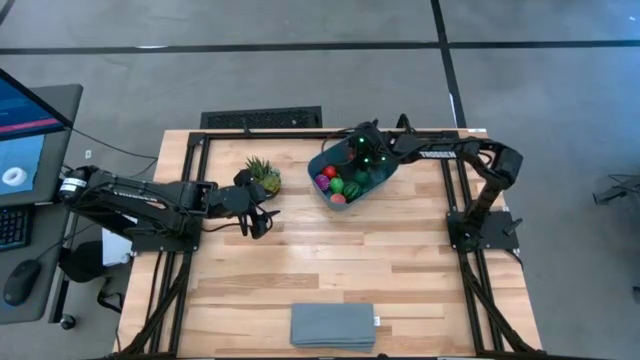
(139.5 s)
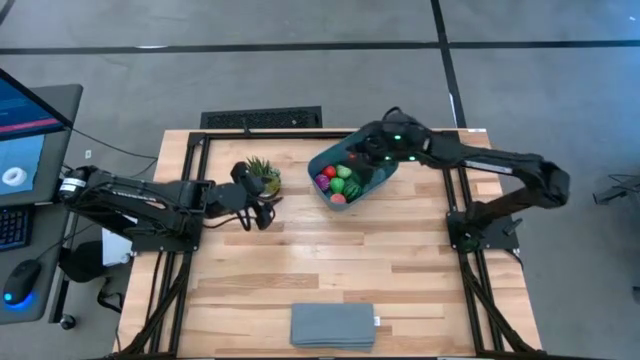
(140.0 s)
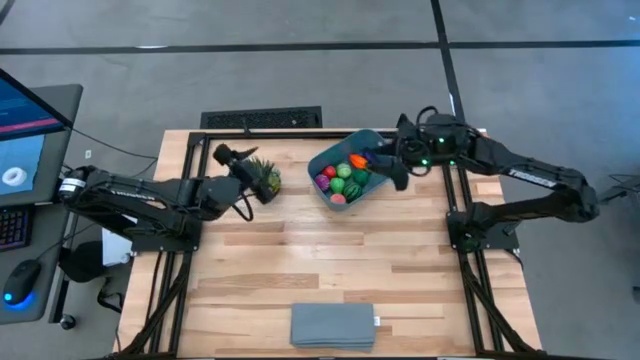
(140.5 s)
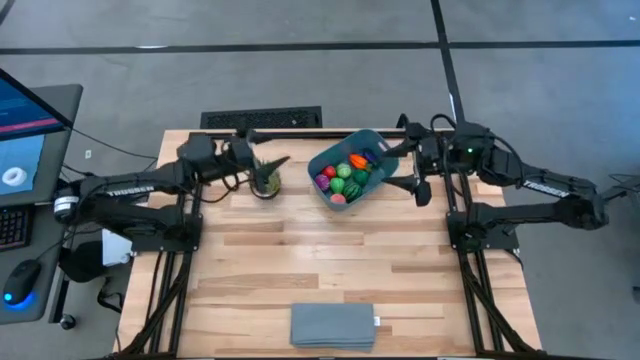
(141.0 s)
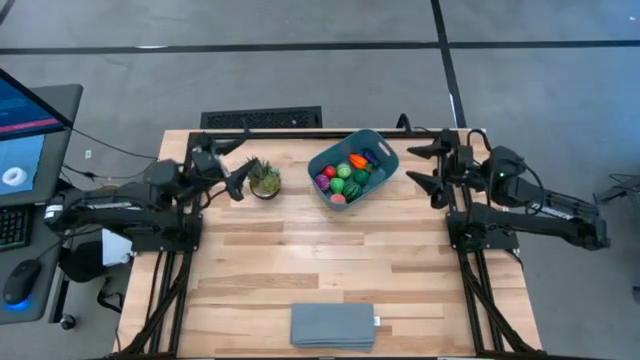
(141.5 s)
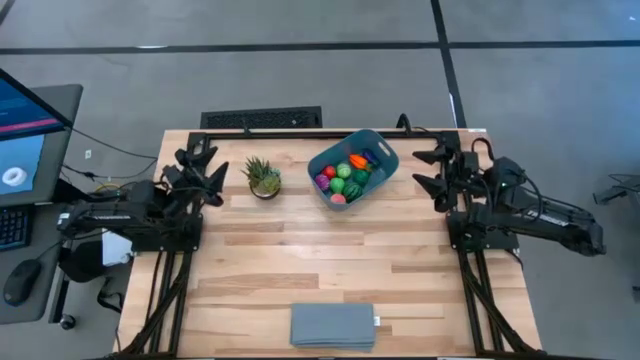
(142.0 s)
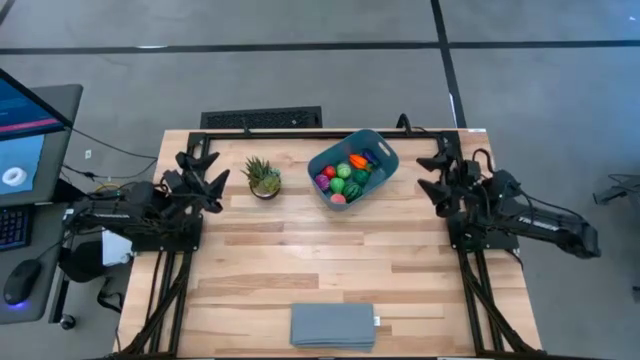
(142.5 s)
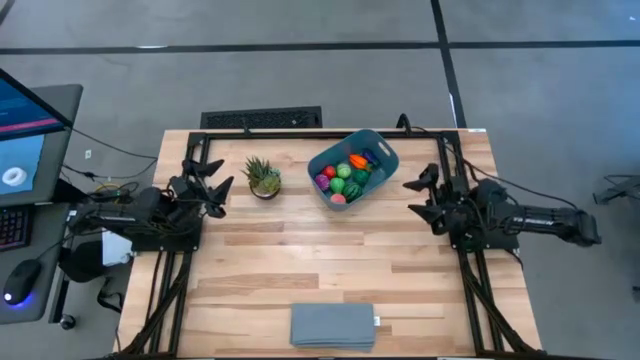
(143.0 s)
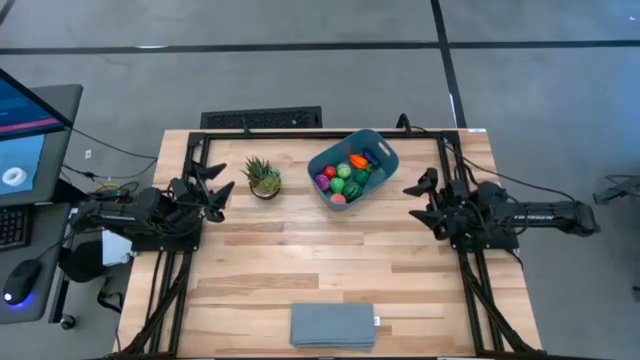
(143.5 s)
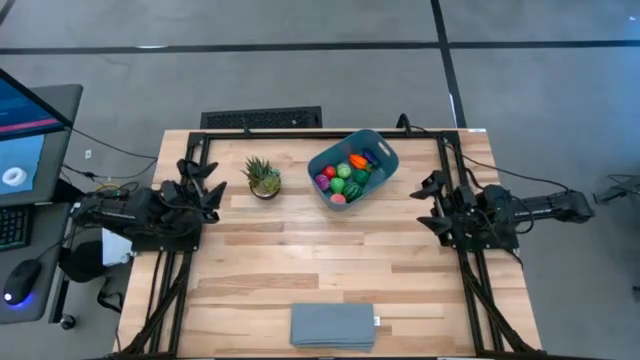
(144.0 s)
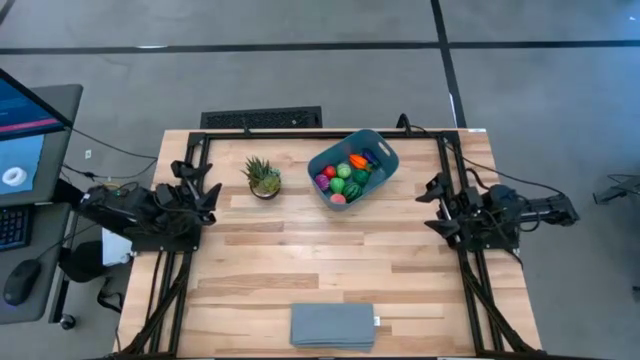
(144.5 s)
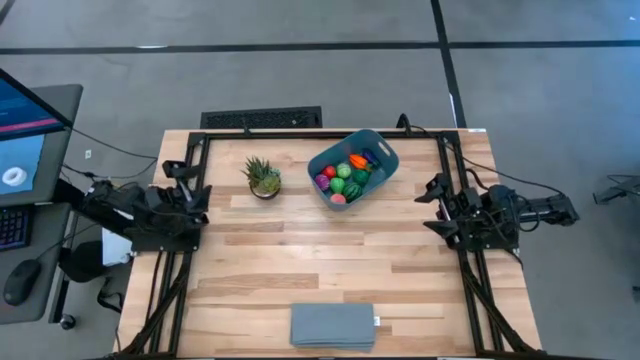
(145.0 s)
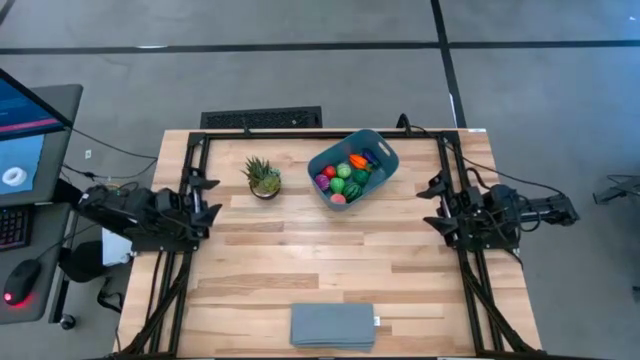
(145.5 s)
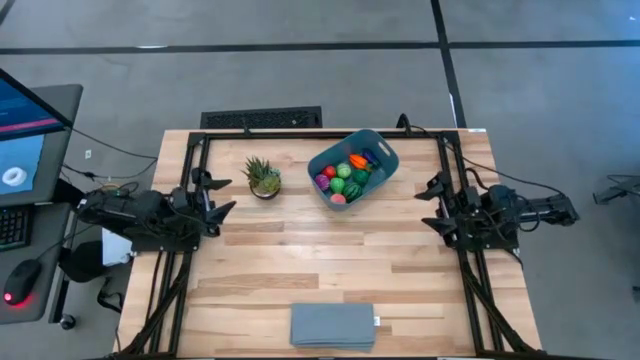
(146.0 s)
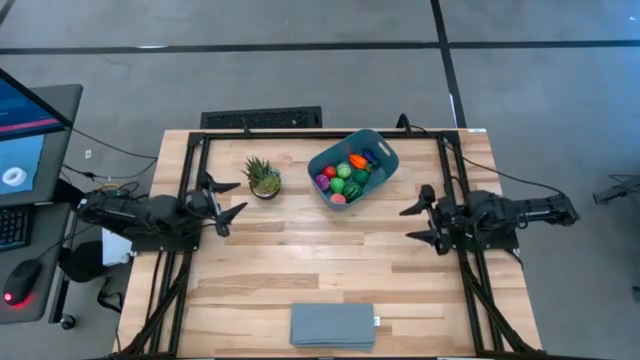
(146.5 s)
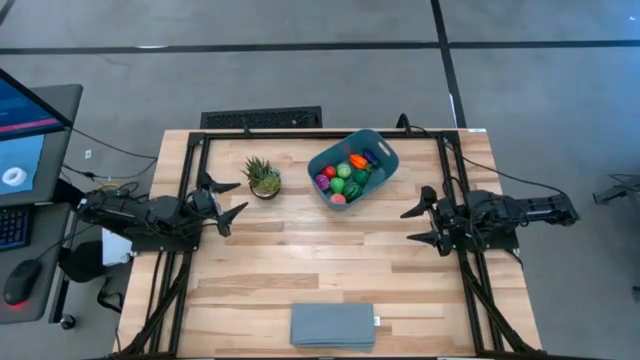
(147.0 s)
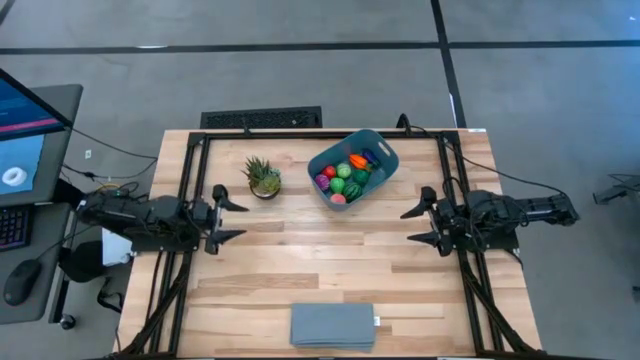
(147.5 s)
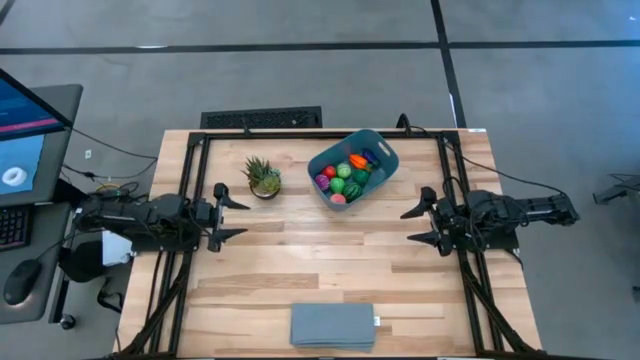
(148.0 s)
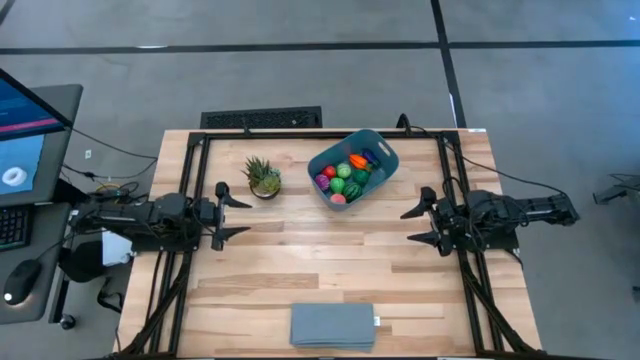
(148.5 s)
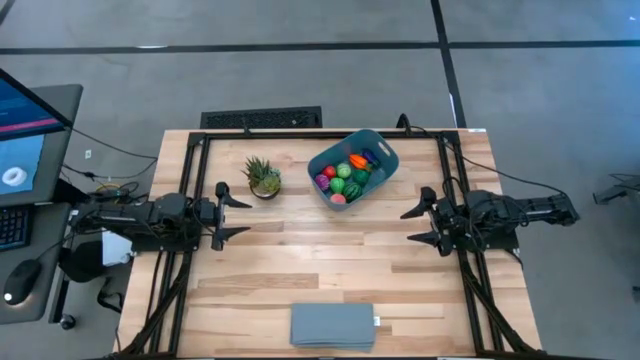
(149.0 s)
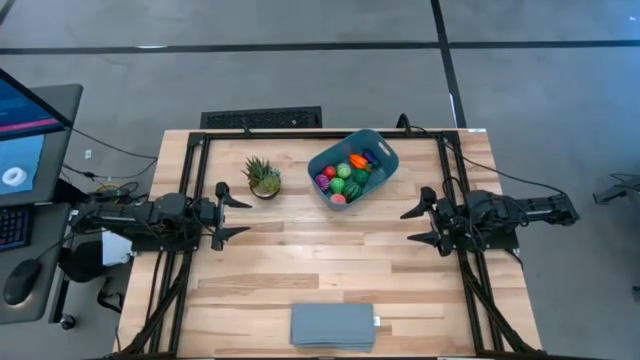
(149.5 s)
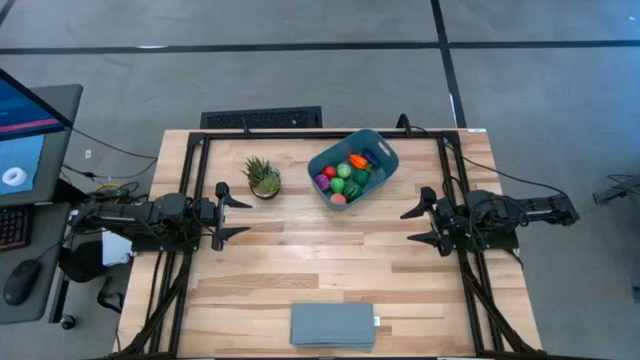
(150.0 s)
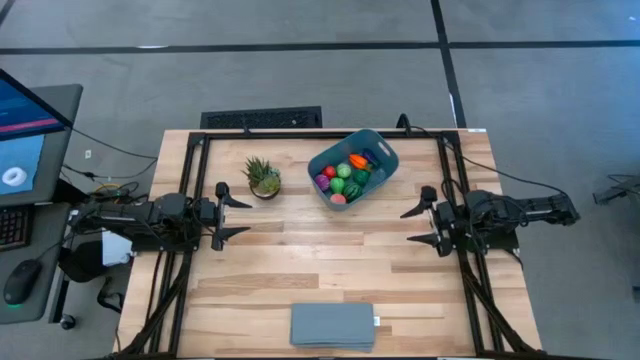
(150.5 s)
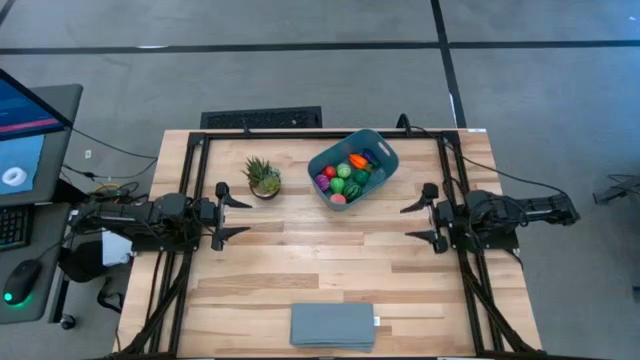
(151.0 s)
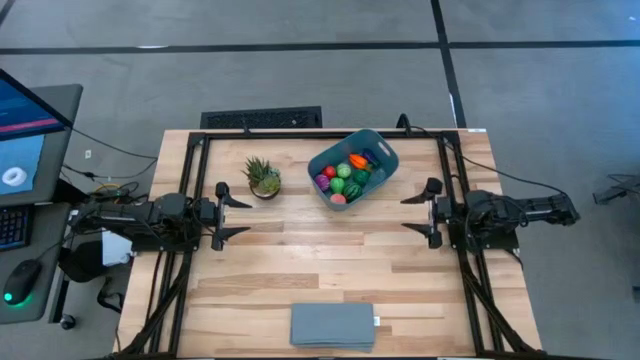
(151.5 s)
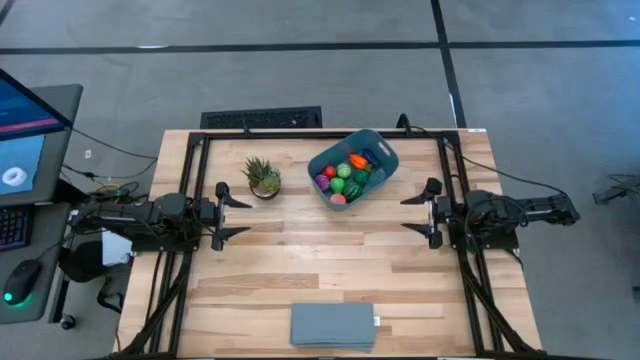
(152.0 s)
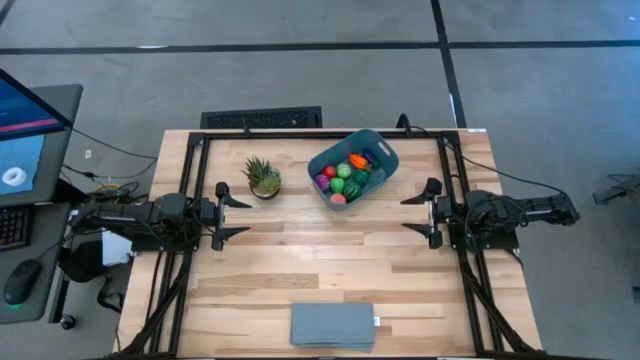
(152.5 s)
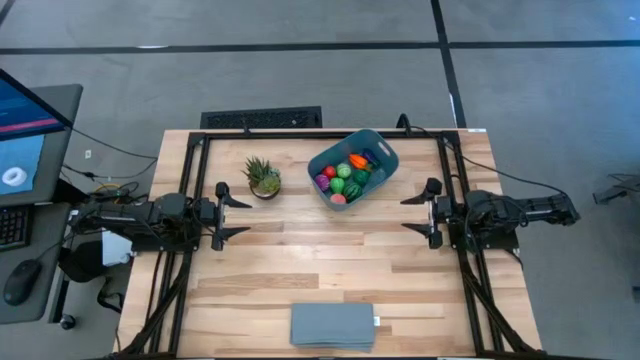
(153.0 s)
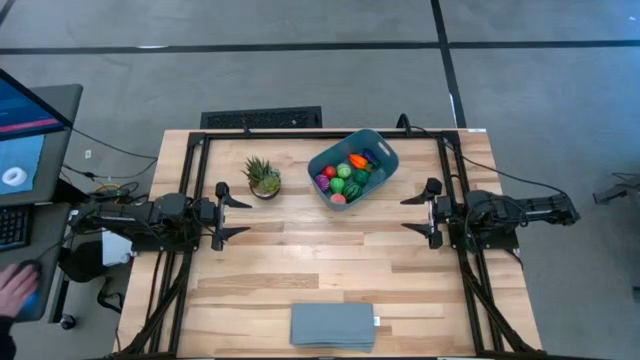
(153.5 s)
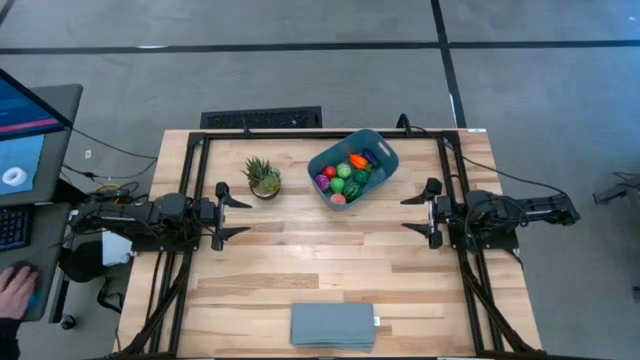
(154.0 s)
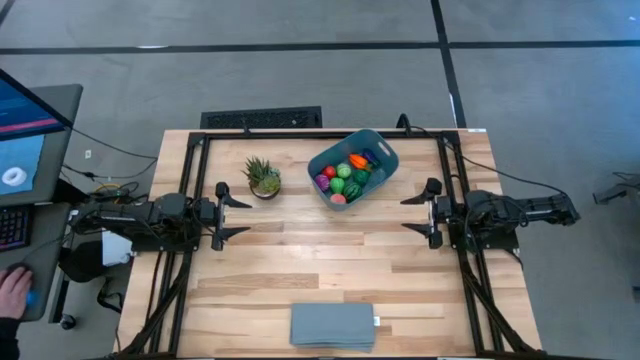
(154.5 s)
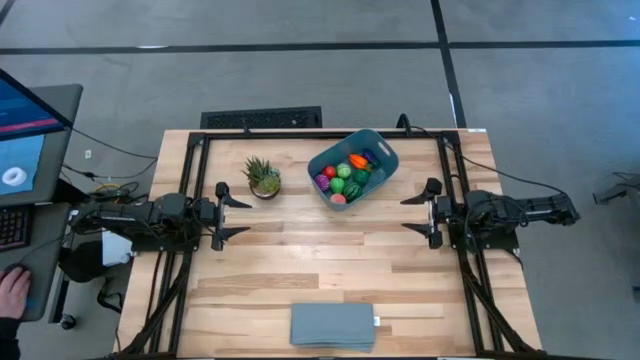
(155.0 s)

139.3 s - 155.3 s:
Task: Pick and placing Produce into tupperware
Return to Home Position
